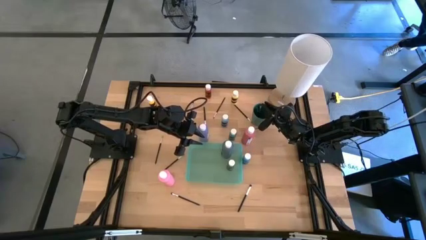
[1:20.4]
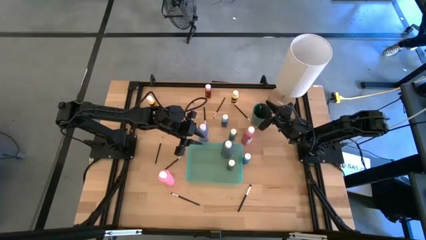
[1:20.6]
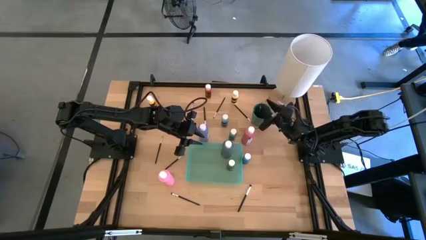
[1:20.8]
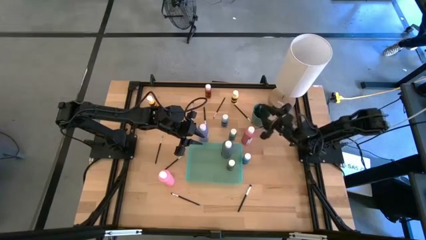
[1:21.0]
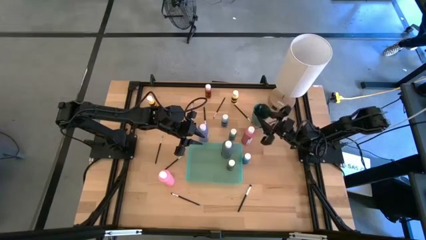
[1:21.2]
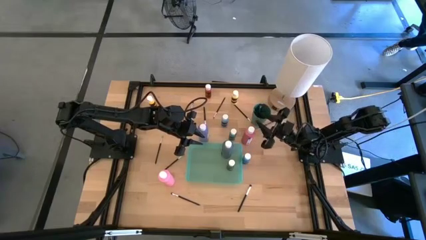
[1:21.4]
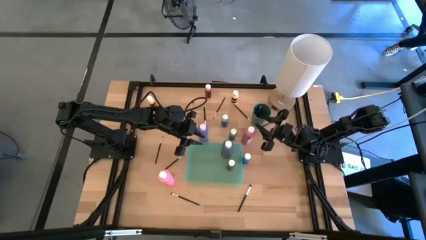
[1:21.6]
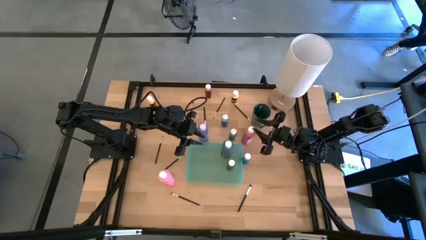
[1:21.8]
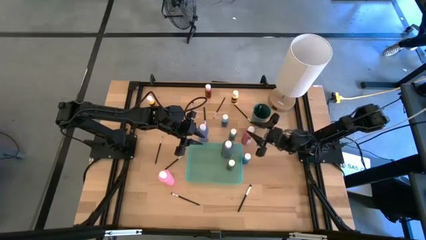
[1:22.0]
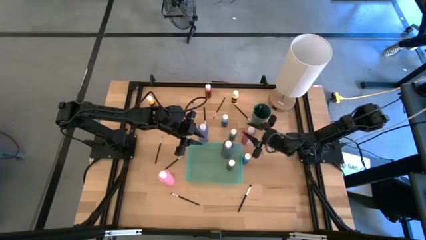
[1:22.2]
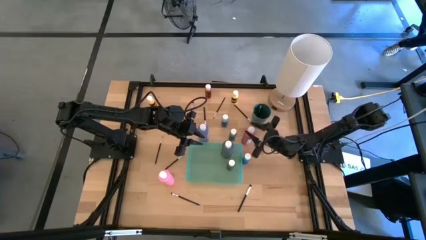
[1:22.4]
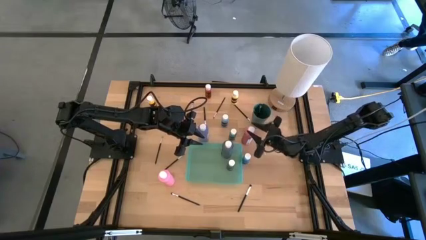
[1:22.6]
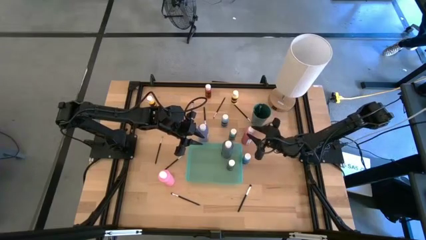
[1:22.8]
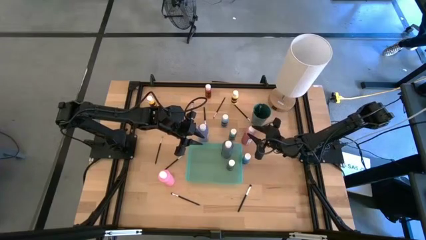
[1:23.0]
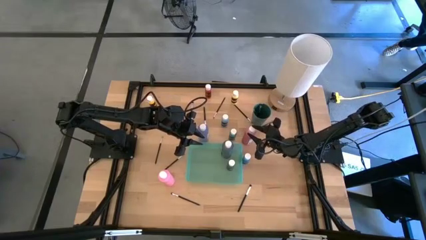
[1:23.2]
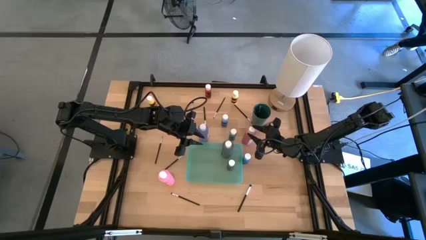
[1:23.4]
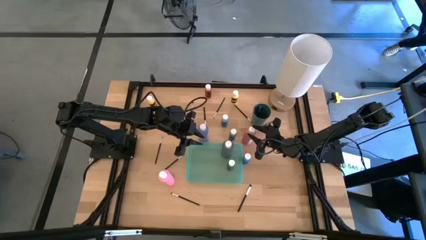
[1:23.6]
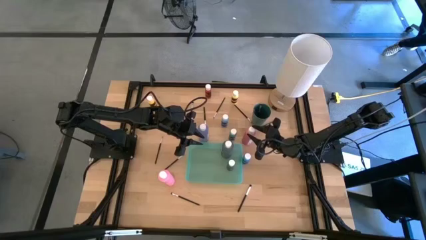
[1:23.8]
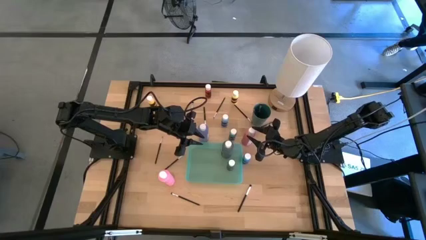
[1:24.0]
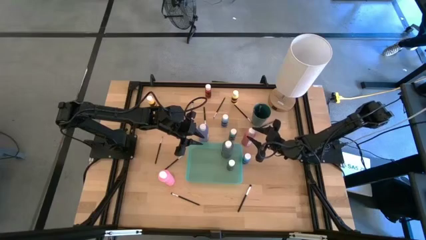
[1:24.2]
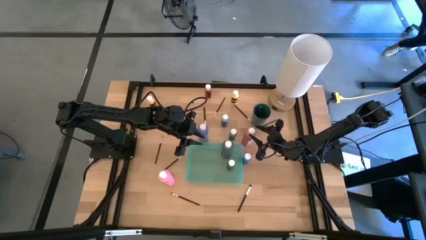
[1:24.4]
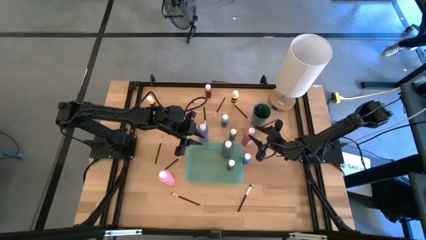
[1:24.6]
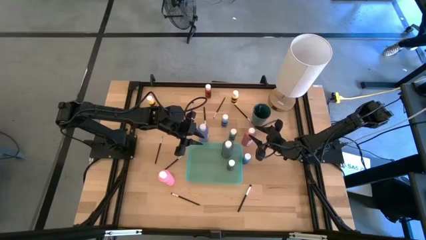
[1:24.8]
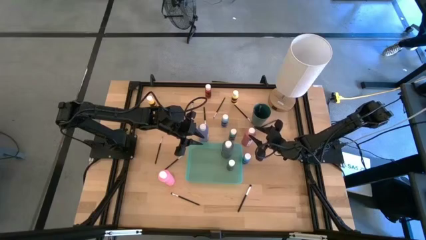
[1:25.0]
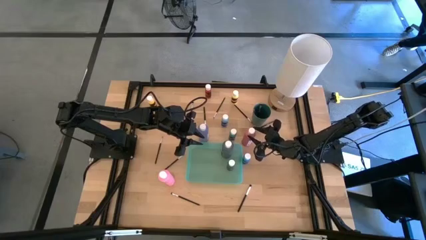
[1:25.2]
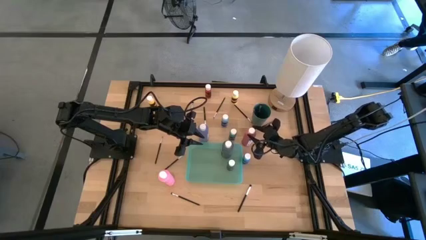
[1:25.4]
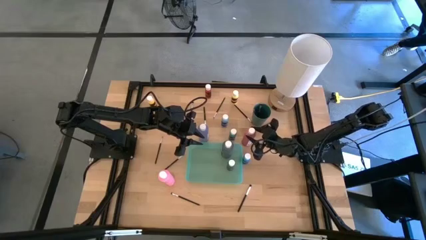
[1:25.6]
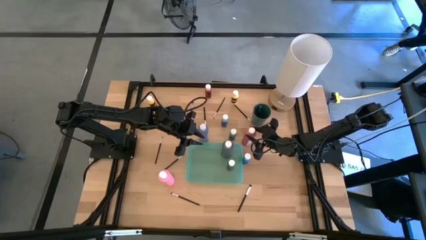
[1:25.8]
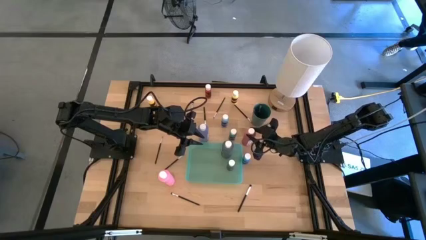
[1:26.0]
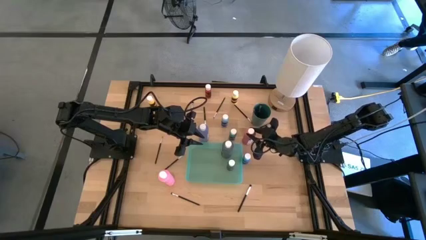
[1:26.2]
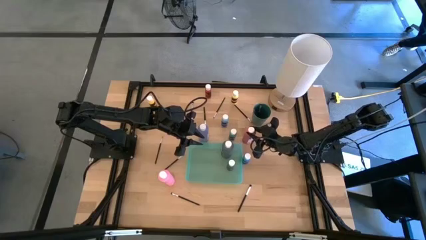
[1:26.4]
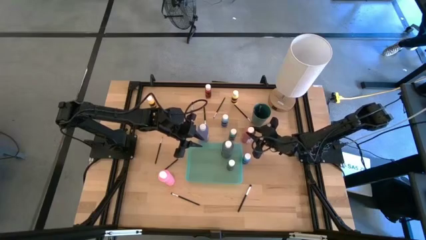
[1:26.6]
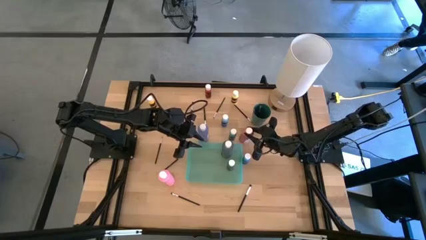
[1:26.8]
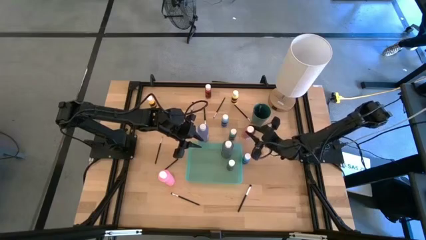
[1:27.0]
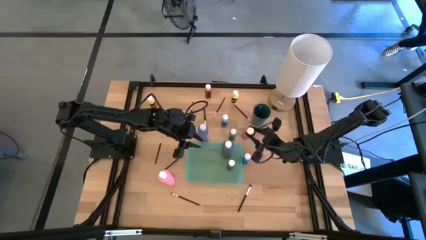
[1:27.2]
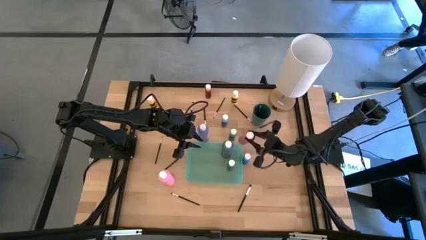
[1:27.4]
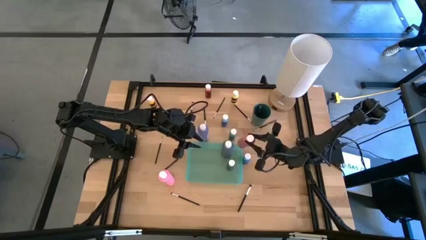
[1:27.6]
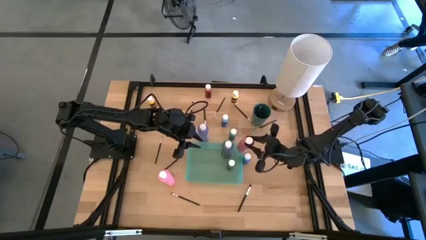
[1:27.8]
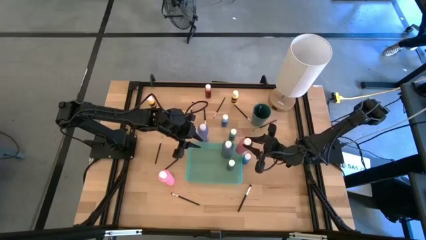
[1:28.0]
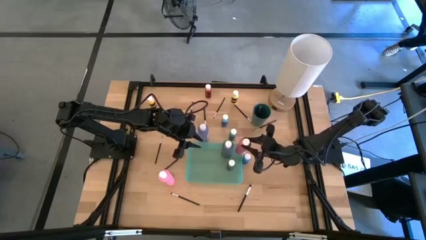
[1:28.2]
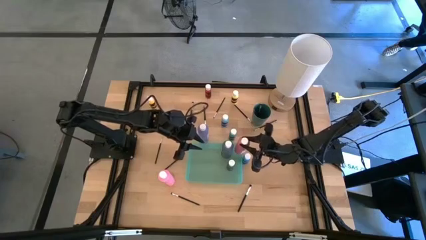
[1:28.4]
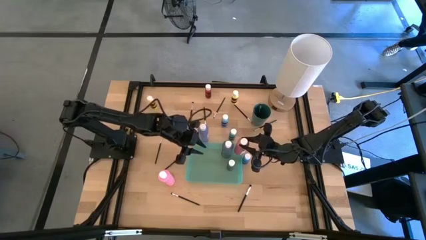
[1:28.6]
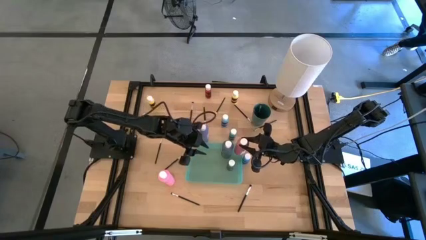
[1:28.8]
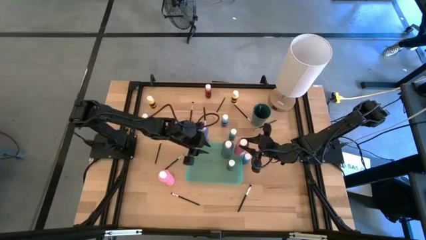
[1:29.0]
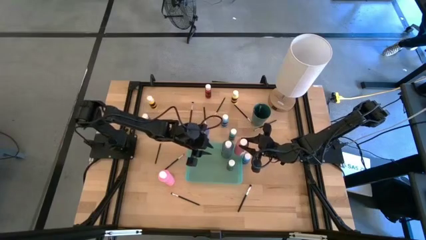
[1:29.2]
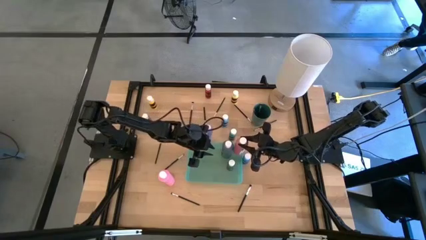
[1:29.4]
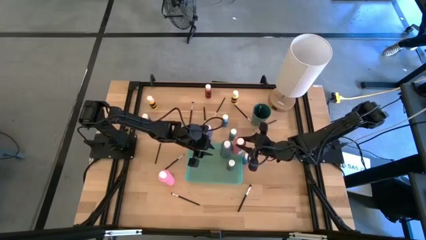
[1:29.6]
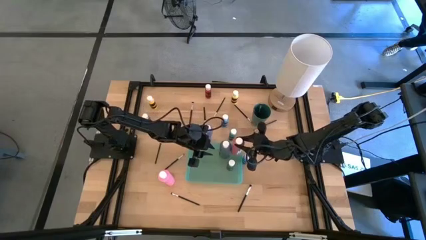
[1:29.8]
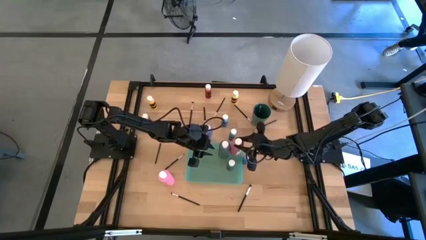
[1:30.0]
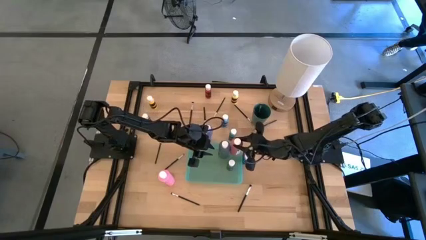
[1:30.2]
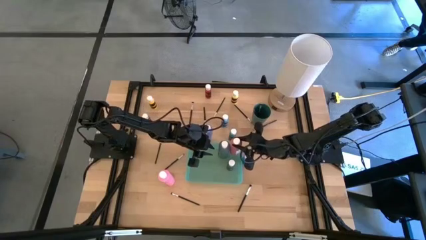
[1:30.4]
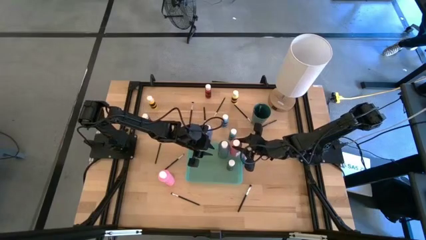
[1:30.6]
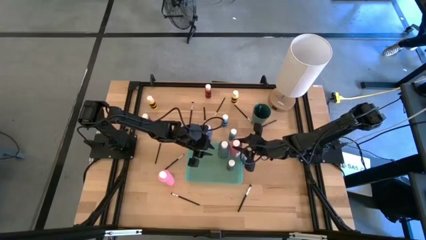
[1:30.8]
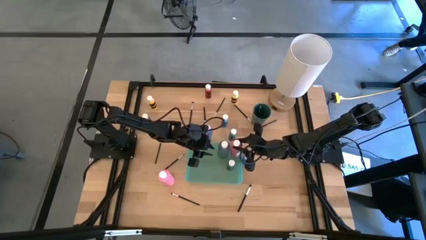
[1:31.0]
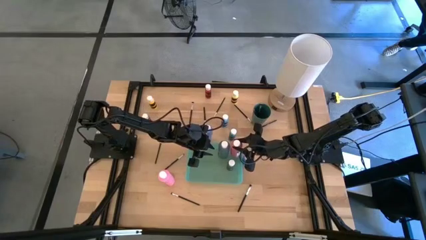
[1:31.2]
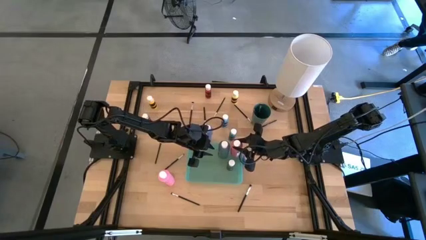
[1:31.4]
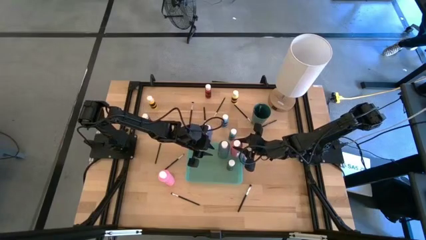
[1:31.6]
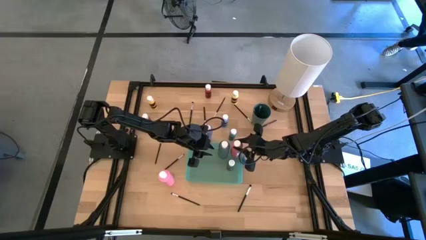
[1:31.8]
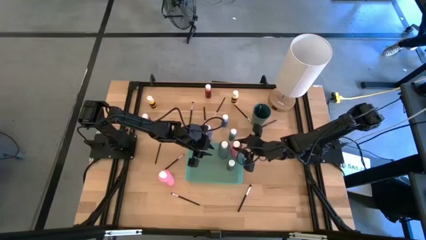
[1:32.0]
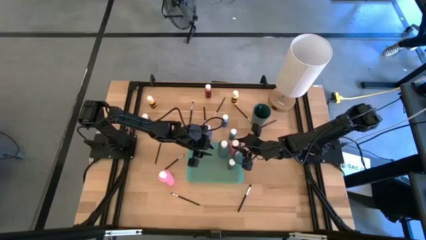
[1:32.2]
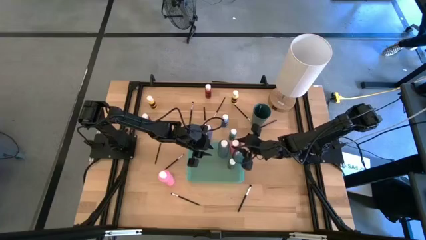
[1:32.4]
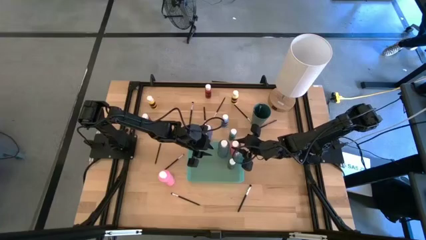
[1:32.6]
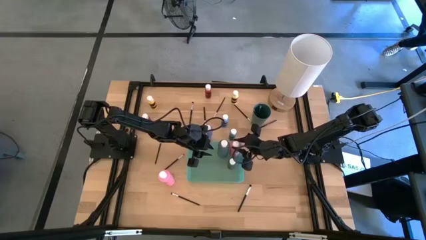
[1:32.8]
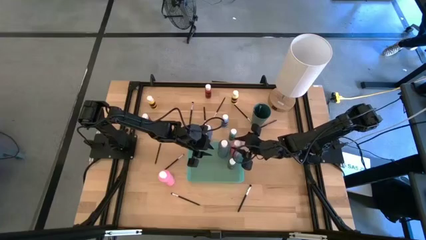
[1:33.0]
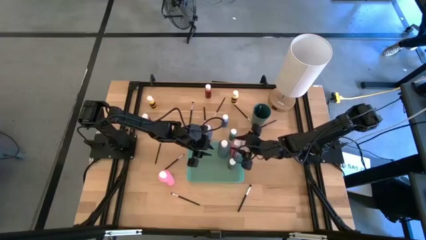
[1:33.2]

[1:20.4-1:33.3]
Task: Pick & Place Paint Supplies
Put the big red paint bottle into the light green bin
